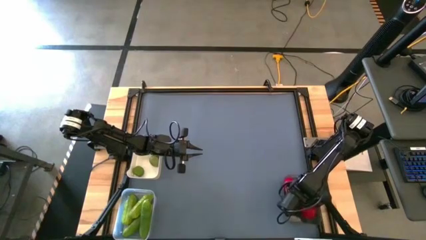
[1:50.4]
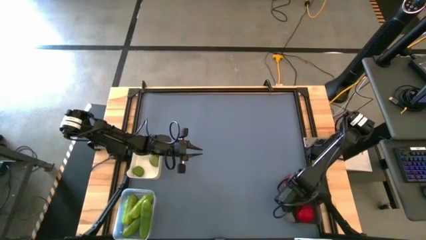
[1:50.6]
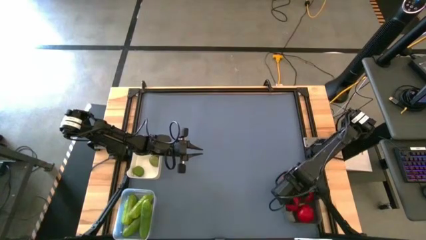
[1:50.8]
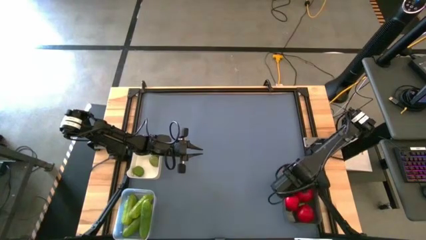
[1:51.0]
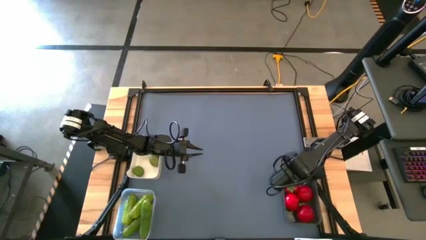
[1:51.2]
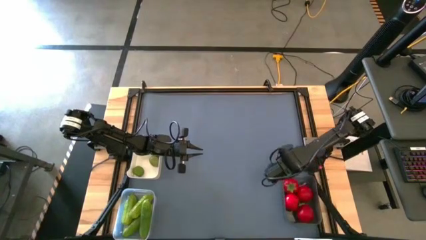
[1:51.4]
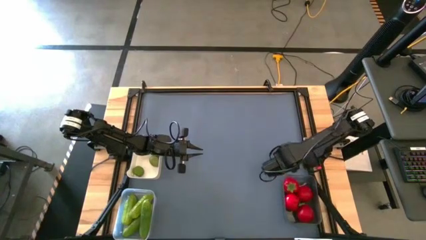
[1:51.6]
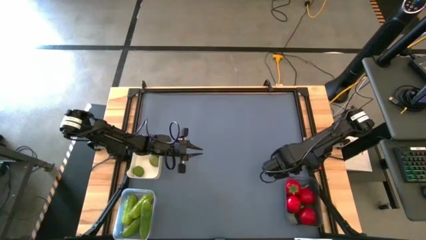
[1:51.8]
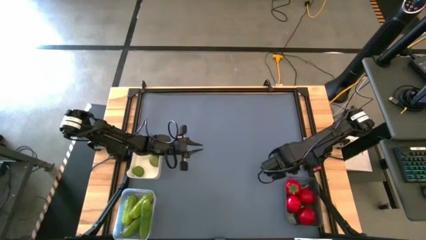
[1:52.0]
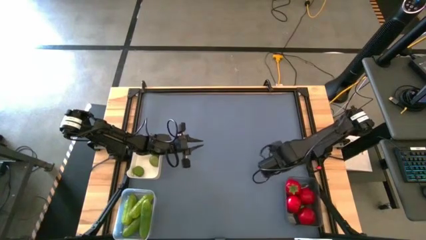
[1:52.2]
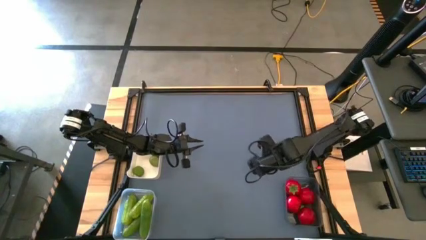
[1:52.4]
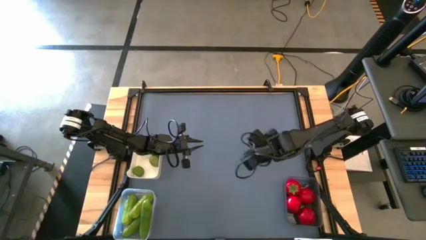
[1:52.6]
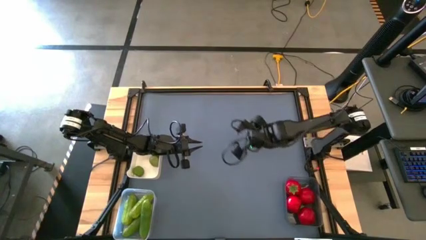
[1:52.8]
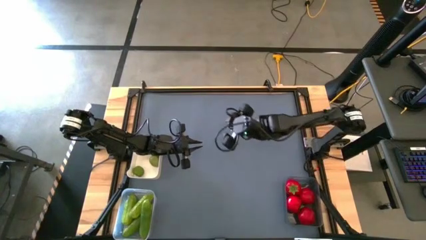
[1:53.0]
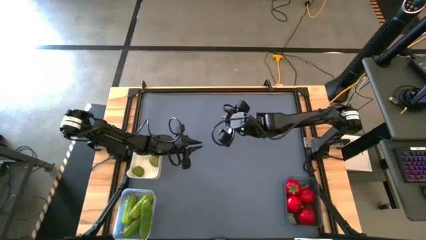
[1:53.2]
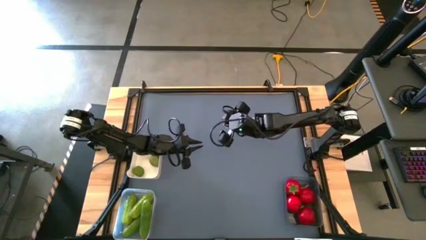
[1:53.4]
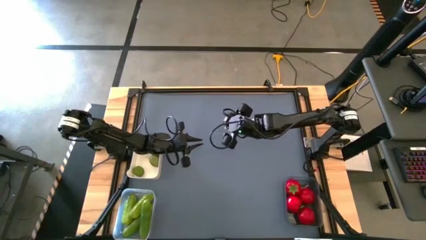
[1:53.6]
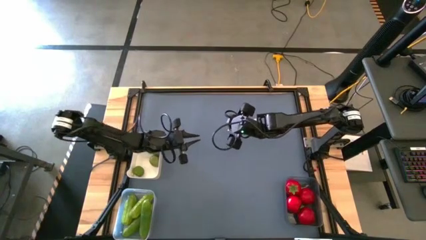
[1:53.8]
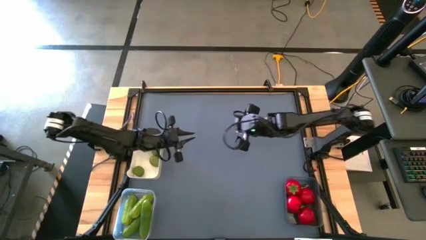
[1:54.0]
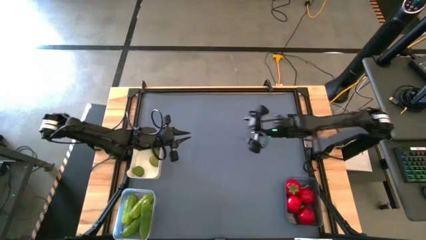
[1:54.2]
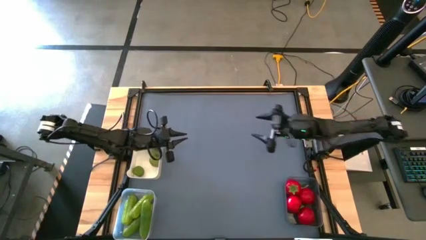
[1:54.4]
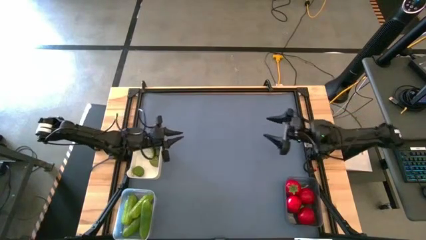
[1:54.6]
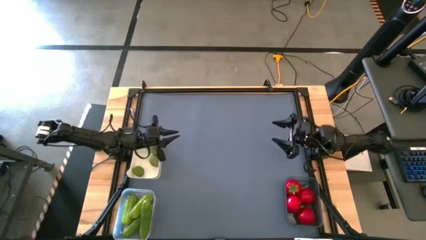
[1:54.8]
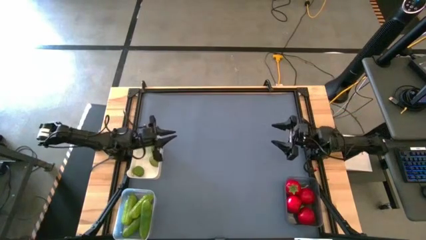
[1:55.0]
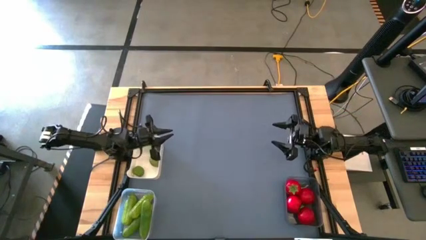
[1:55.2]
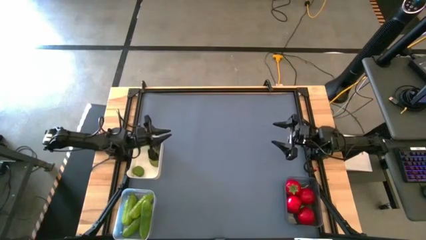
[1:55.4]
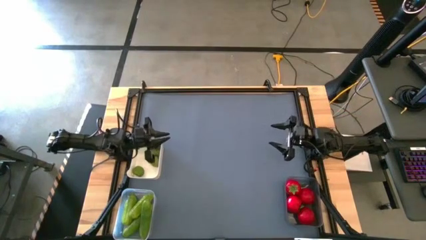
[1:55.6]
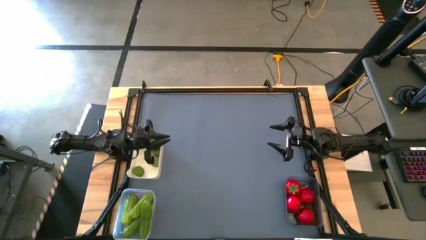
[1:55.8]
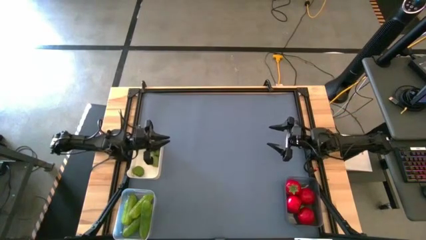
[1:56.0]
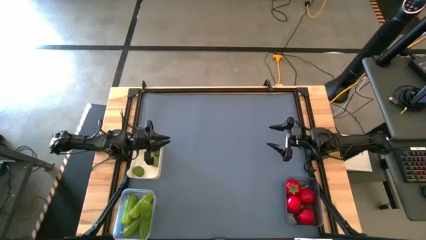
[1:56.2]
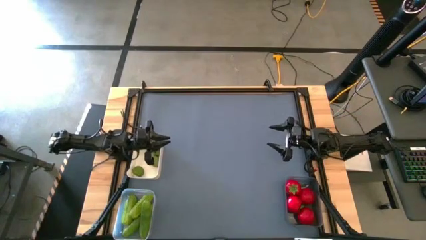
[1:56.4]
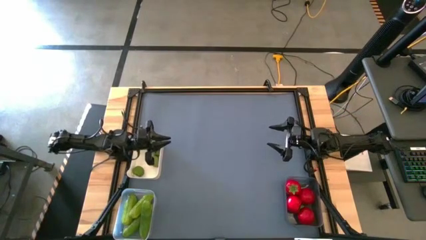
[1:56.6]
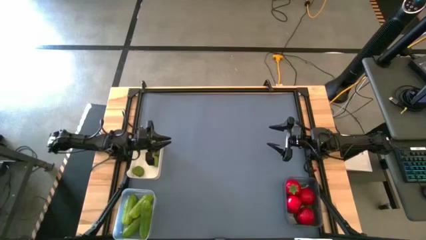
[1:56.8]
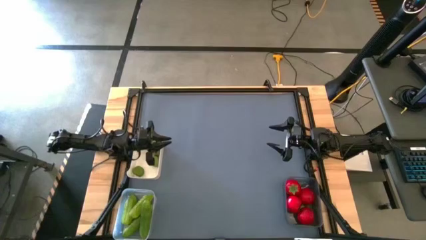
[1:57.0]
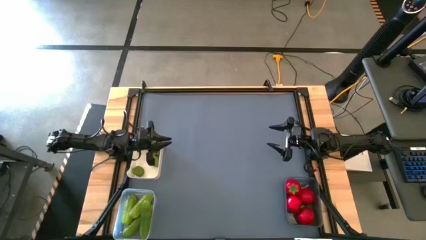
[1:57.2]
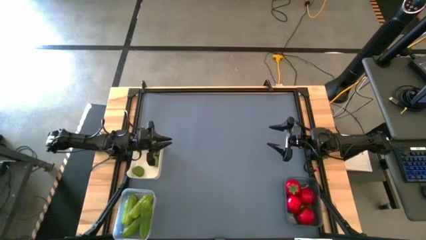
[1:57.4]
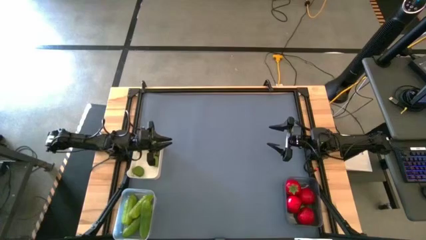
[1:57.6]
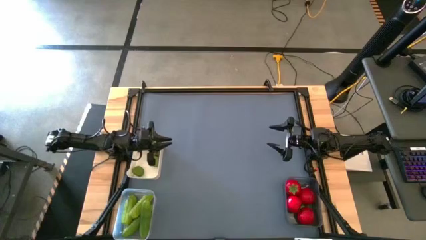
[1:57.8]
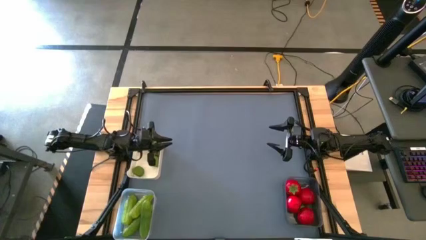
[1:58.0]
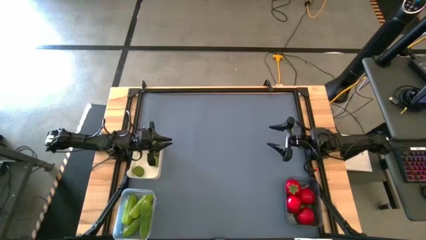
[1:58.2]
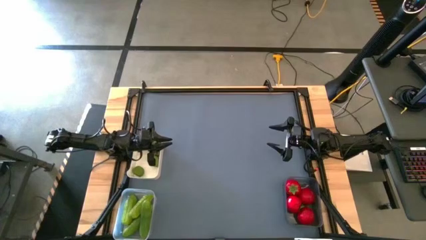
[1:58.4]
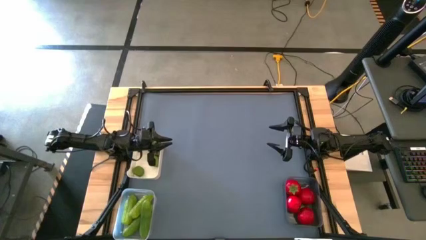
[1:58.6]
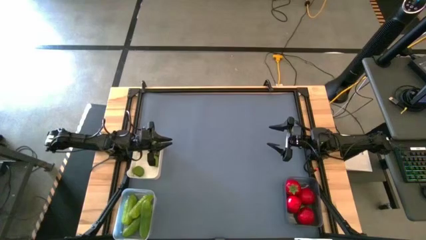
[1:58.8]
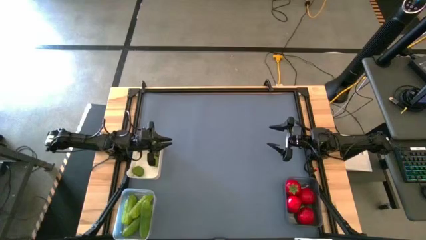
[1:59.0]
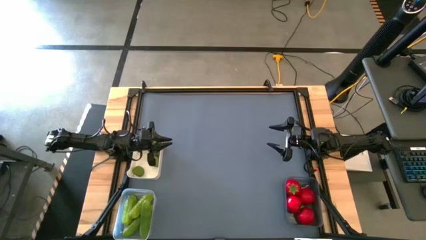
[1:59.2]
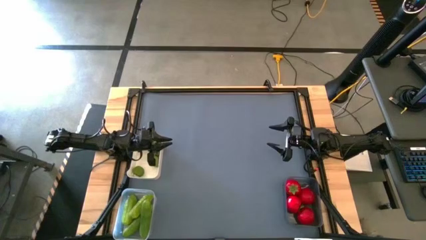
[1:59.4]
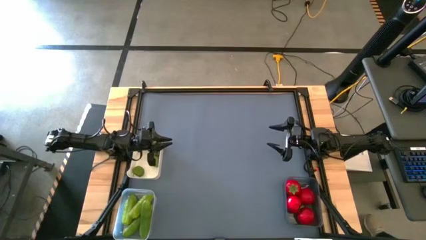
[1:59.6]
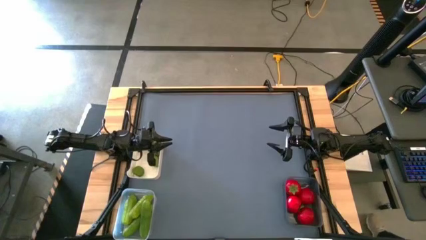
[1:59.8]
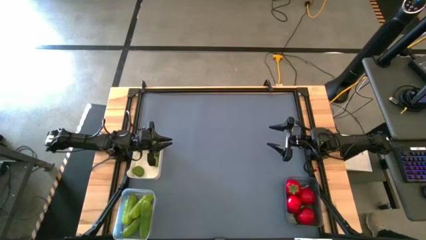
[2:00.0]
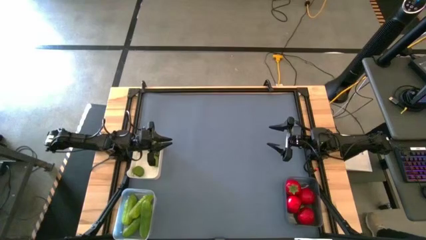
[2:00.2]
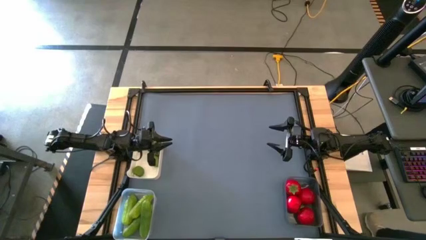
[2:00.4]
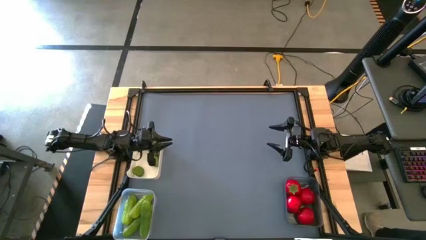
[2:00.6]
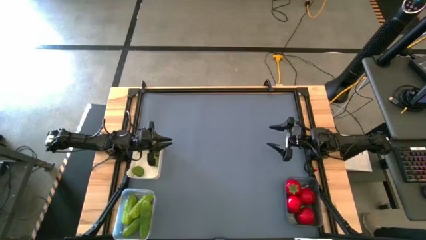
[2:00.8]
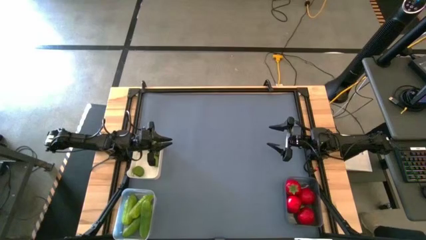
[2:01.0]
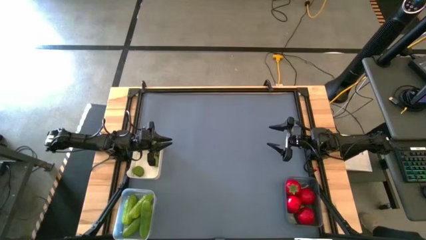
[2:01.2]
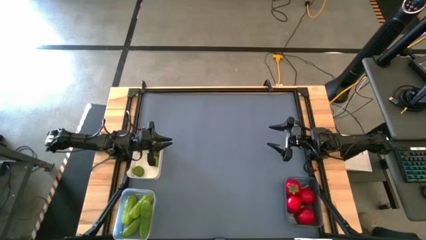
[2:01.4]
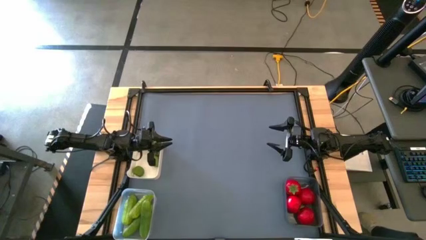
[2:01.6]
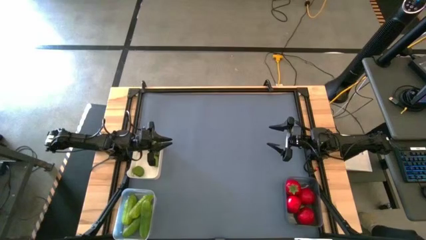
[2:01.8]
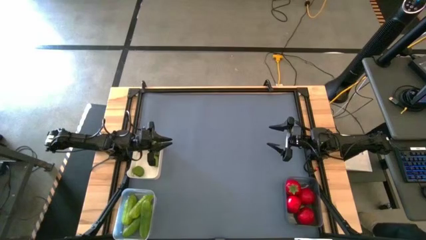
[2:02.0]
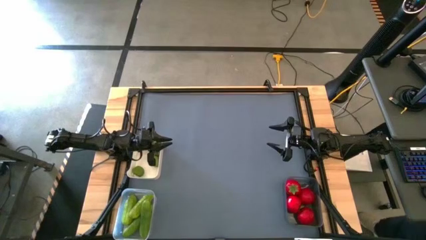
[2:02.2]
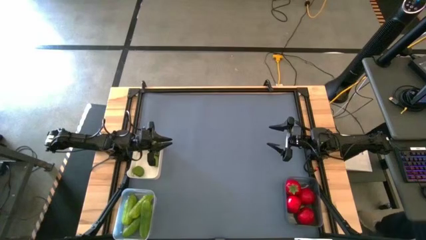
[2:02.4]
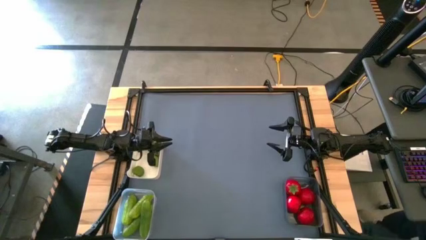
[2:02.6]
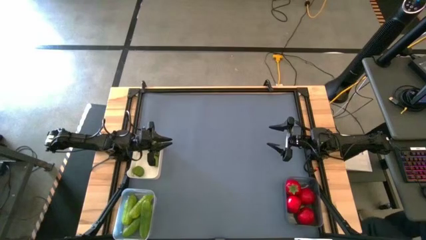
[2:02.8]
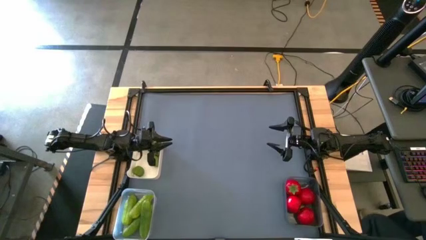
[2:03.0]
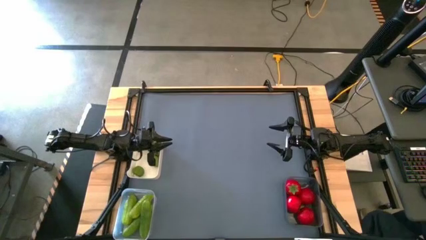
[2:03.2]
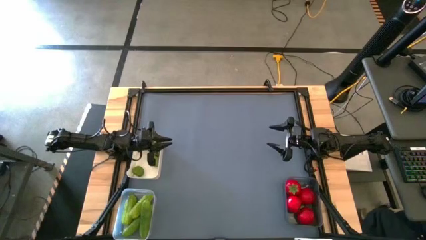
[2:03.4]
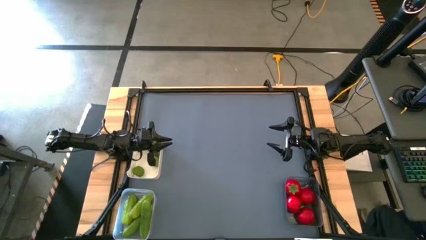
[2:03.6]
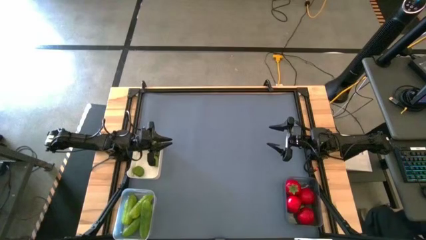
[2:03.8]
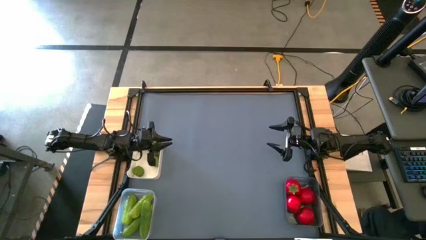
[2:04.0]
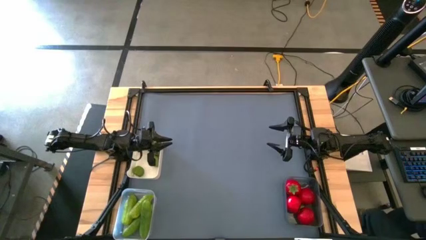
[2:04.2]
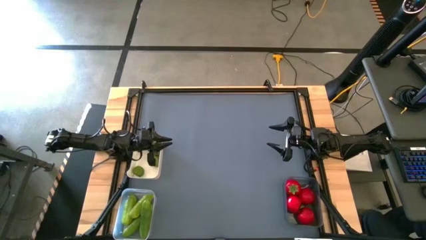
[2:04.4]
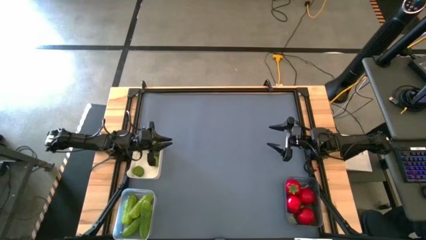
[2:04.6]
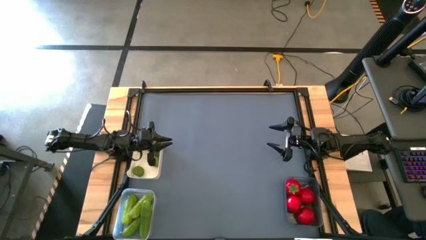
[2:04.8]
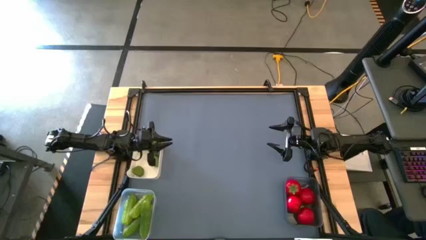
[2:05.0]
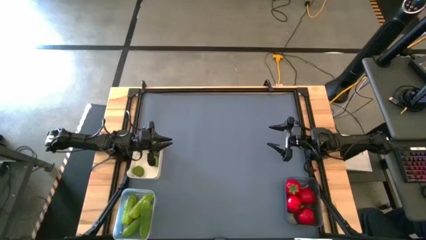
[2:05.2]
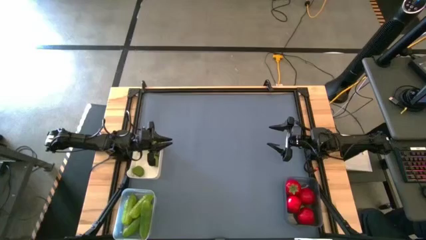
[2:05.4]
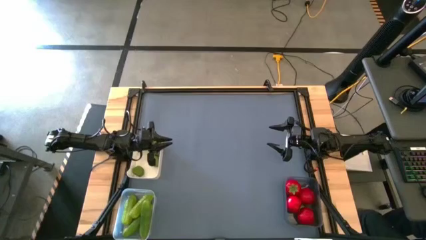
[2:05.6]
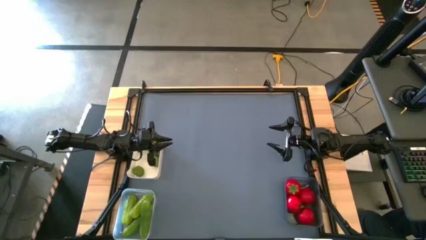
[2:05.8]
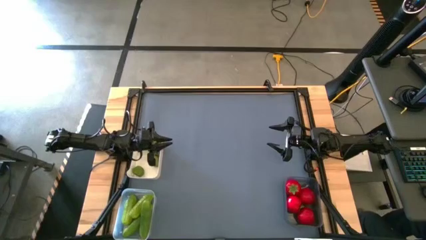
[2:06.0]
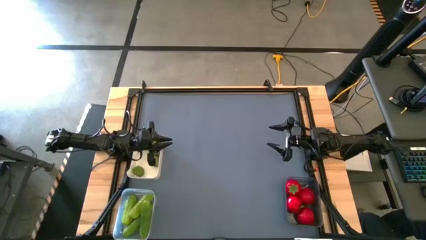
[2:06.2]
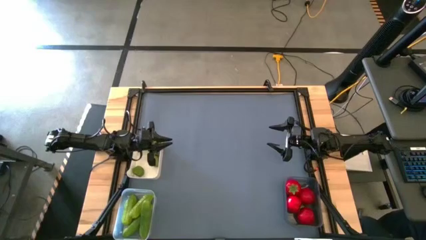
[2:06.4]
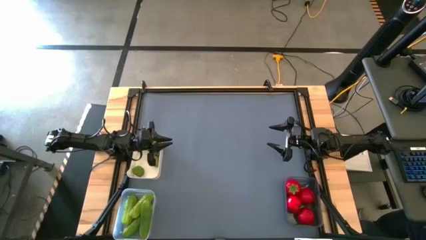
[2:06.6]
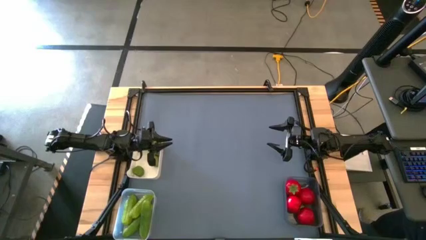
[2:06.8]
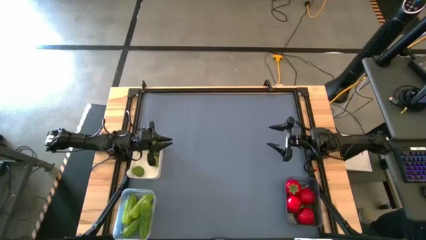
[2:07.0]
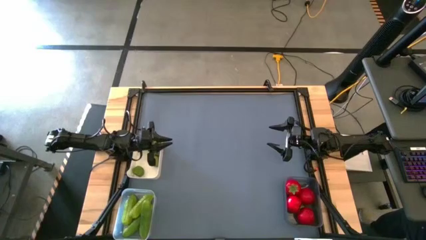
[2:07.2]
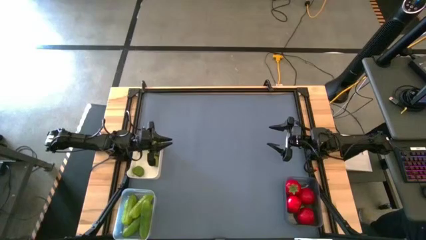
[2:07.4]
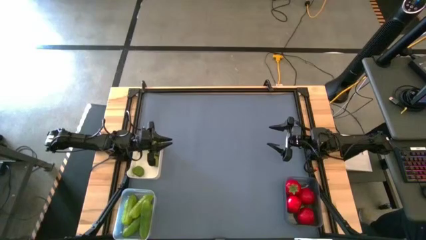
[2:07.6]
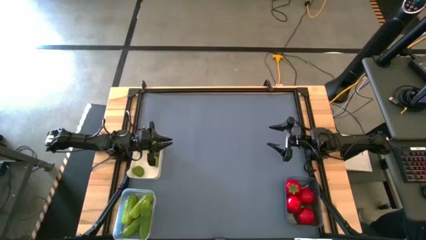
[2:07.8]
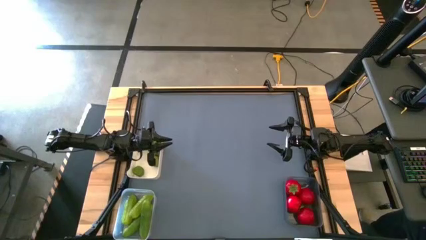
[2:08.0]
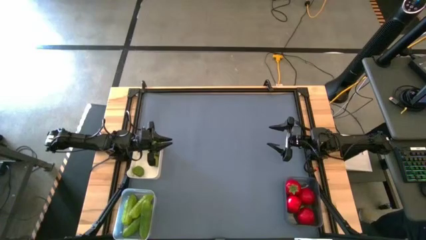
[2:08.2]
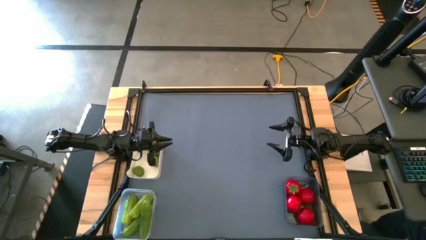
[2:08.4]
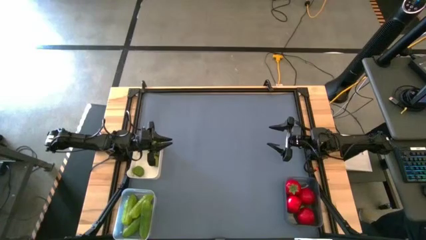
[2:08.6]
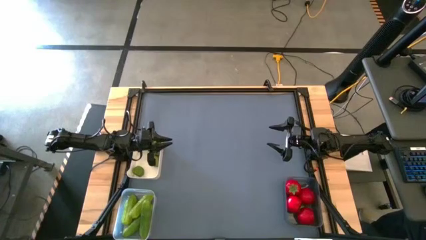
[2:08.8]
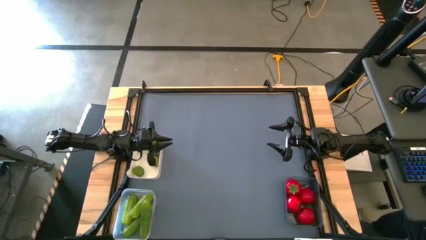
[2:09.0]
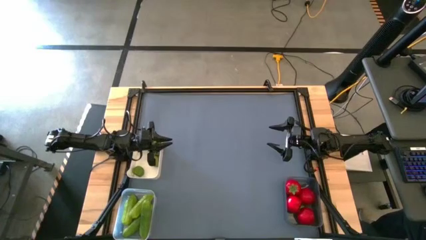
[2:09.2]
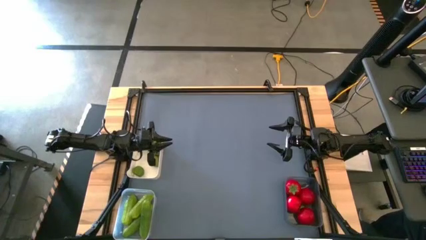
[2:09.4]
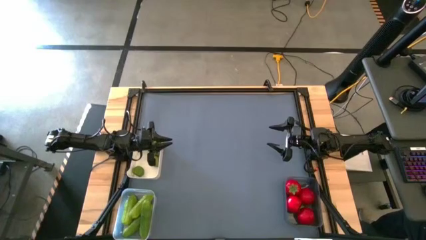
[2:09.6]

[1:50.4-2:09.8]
Task: Sort produce into baskets
Return to Home Position
